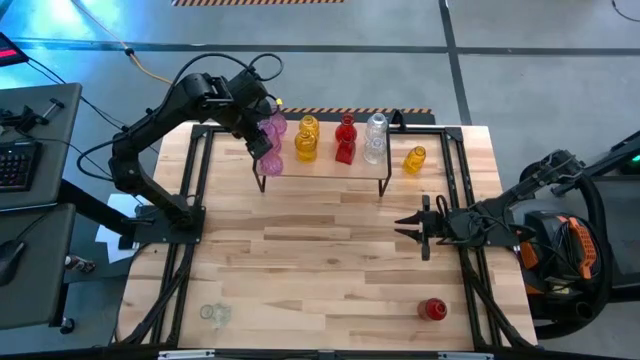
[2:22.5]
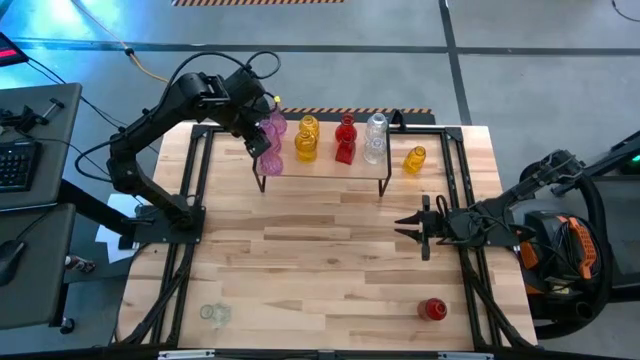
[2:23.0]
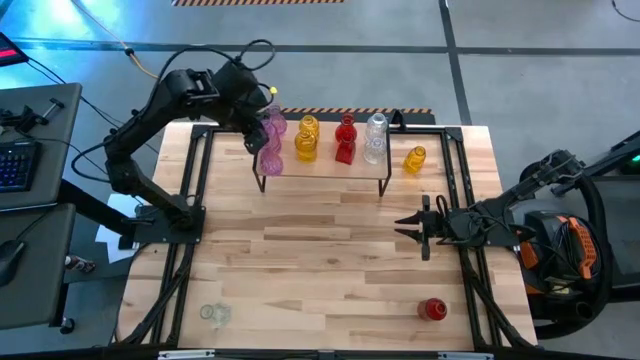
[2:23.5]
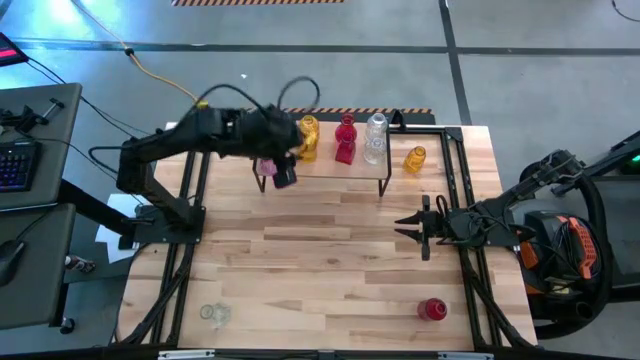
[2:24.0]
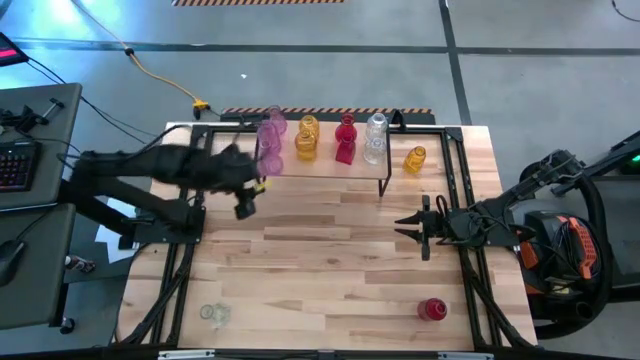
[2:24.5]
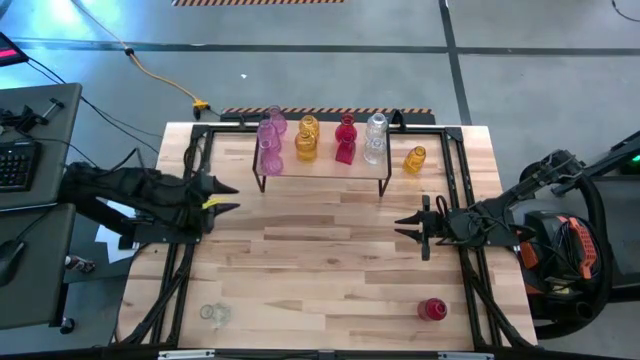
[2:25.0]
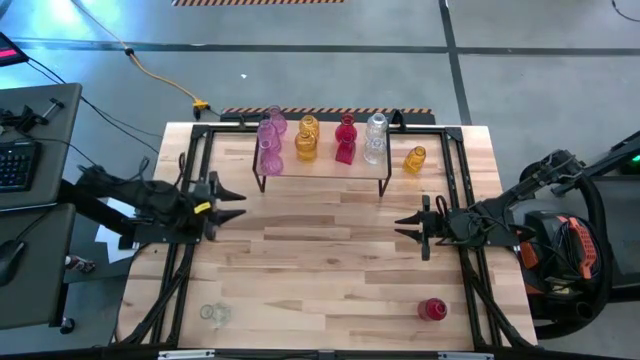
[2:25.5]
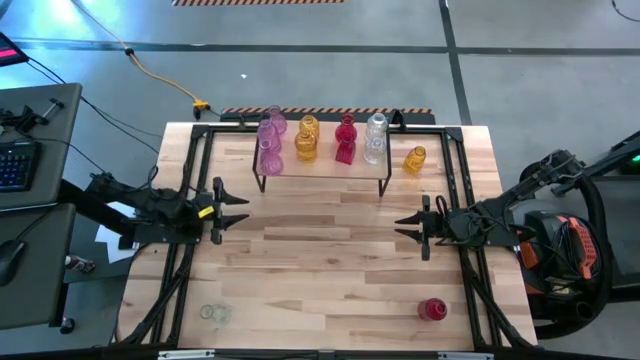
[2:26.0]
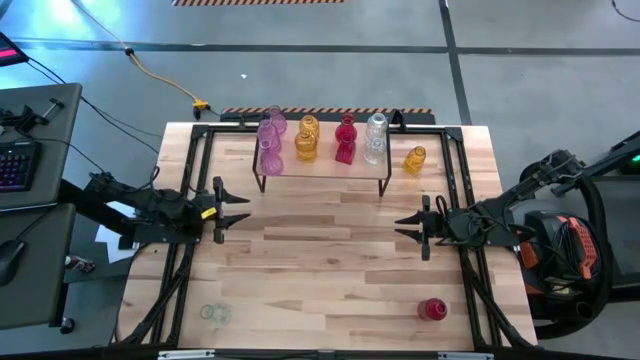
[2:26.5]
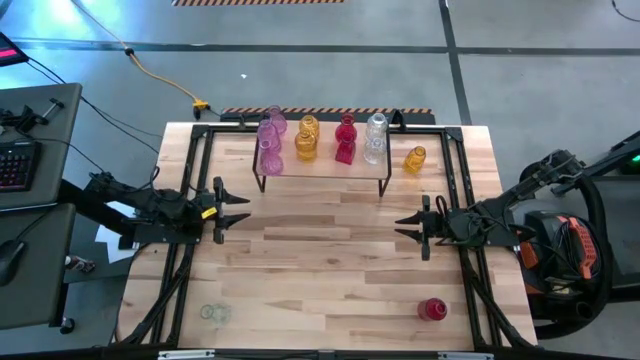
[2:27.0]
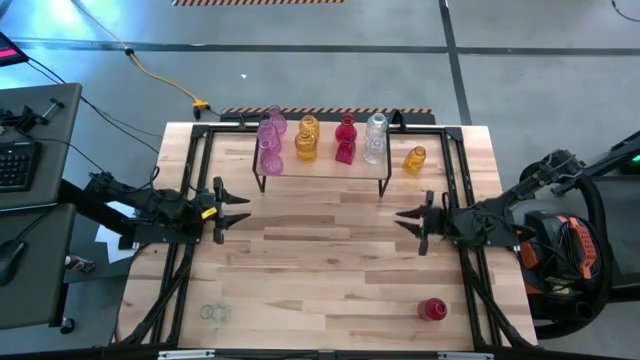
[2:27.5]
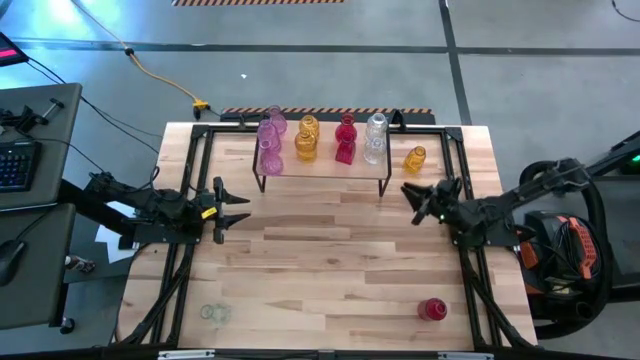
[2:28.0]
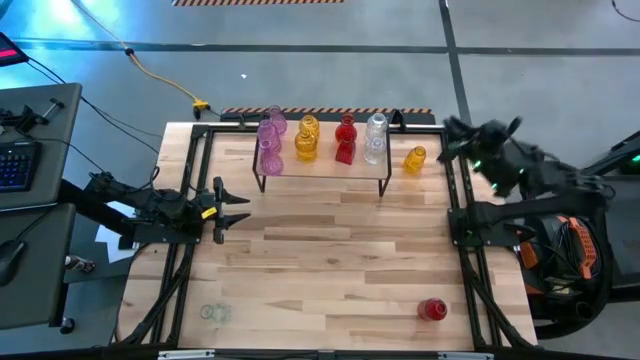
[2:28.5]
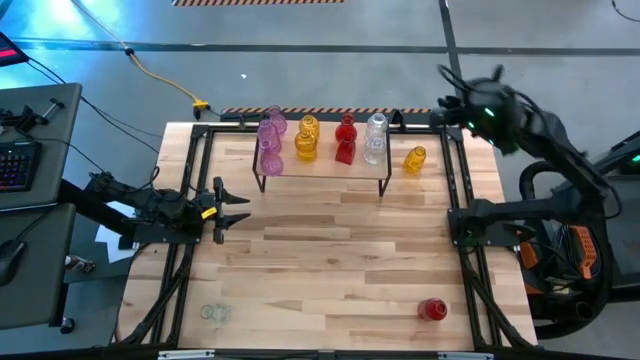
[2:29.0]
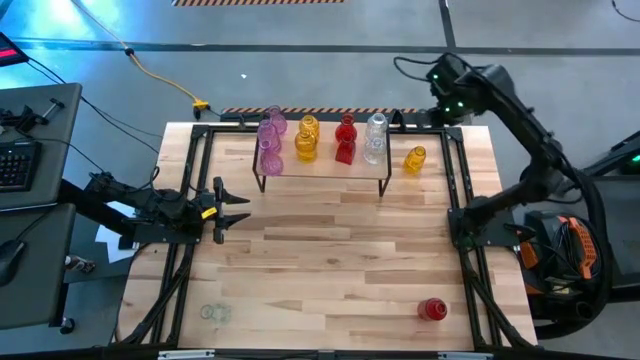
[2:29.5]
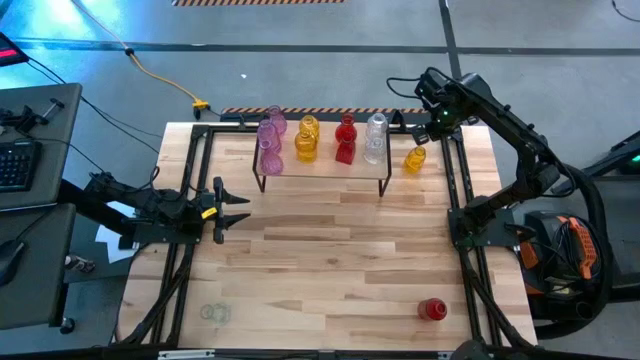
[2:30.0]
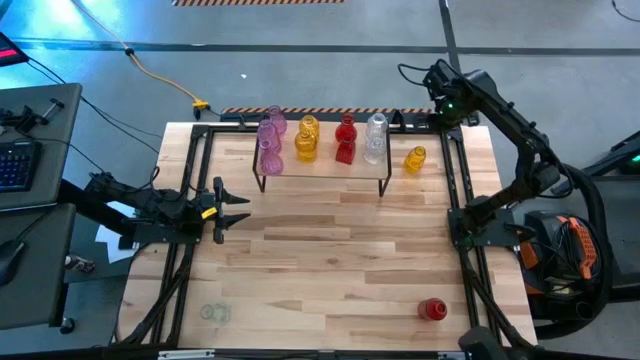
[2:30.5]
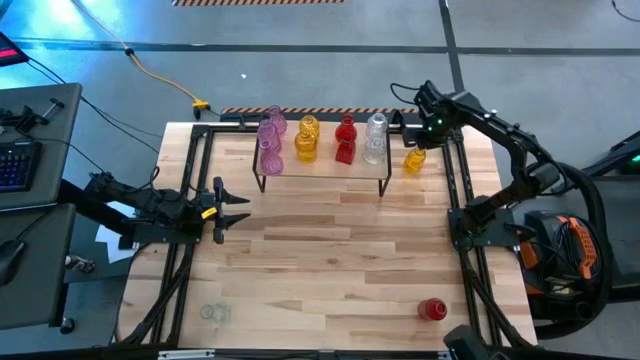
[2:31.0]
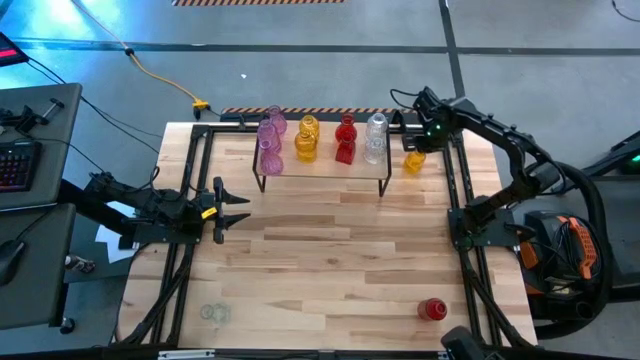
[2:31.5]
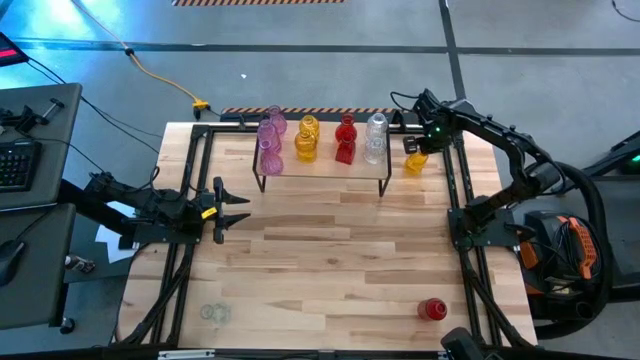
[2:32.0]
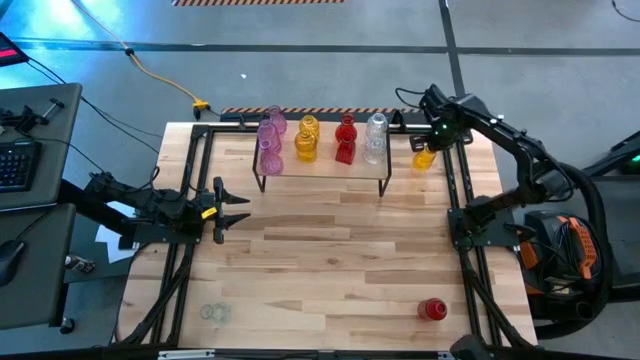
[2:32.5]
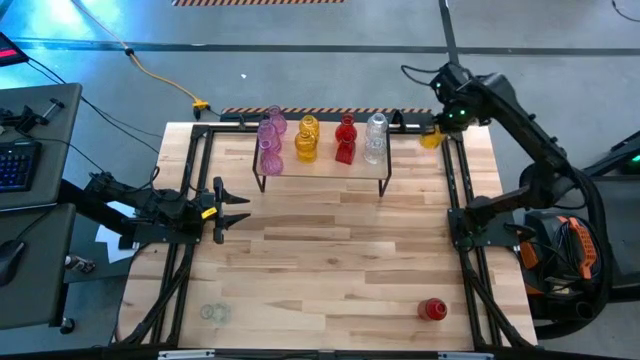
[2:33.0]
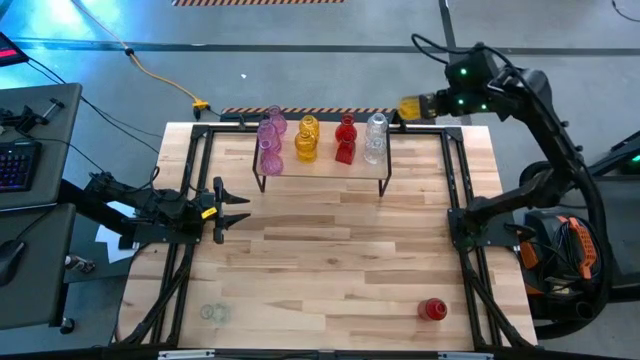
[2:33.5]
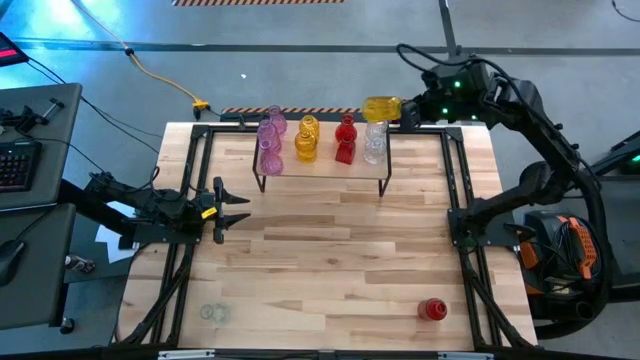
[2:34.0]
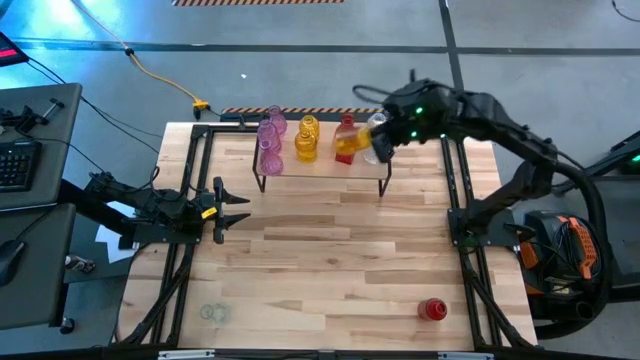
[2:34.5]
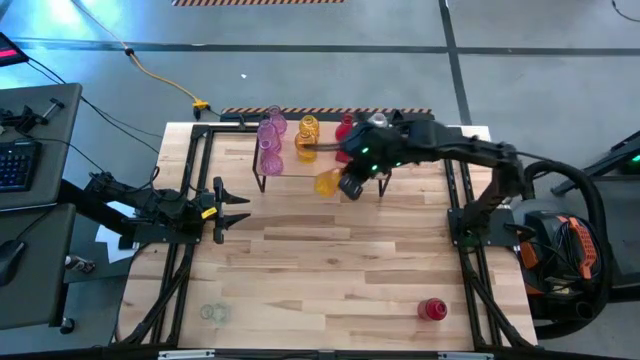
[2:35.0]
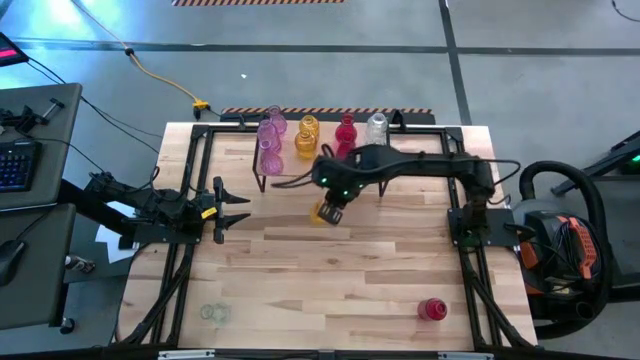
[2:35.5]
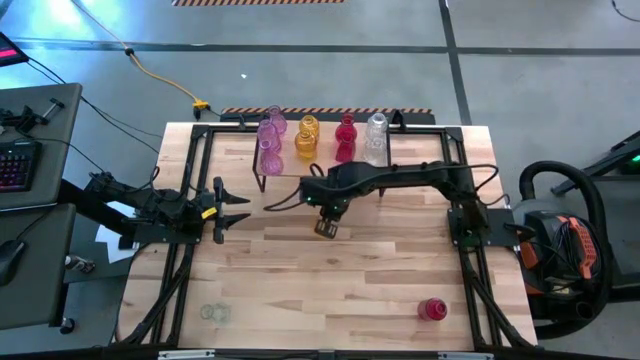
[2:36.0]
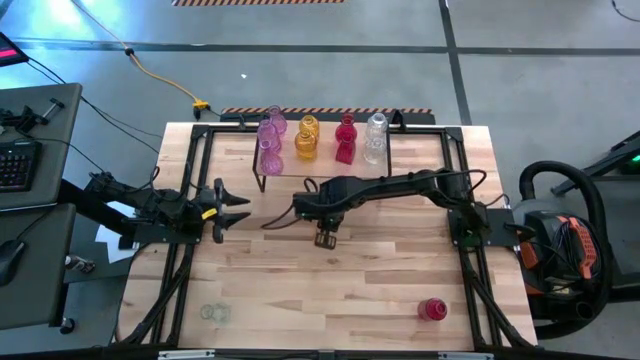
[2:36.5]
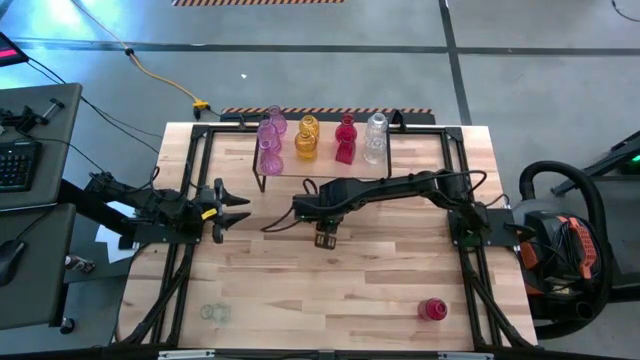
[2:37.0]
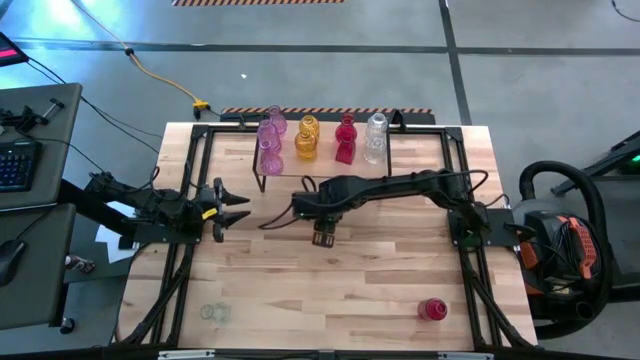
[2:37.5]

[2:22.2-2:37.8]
Task: sort vases onto shelf
Put the yellow vase on the shelf aligned with the other yellow vases

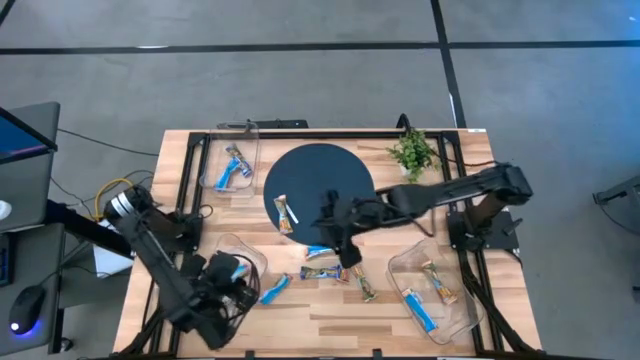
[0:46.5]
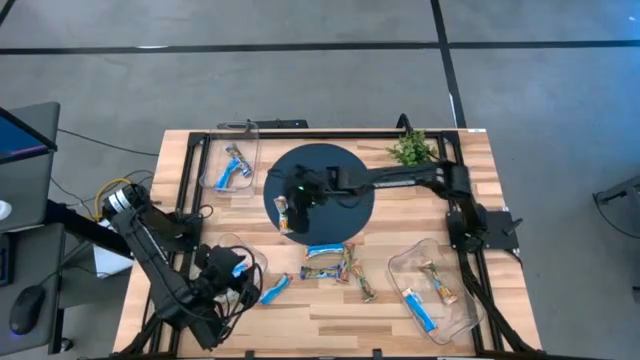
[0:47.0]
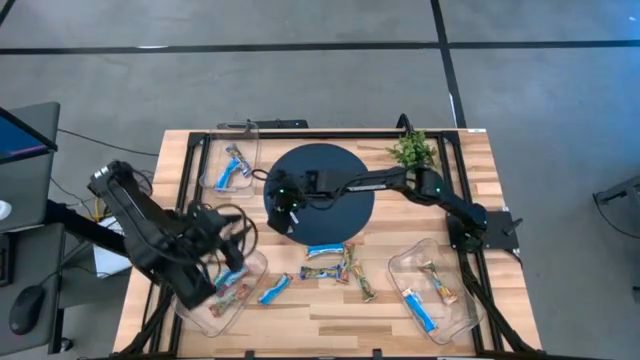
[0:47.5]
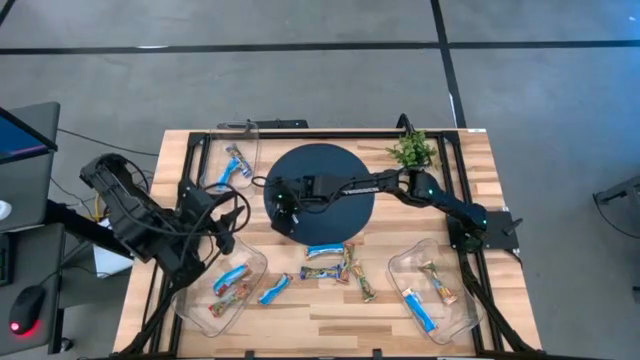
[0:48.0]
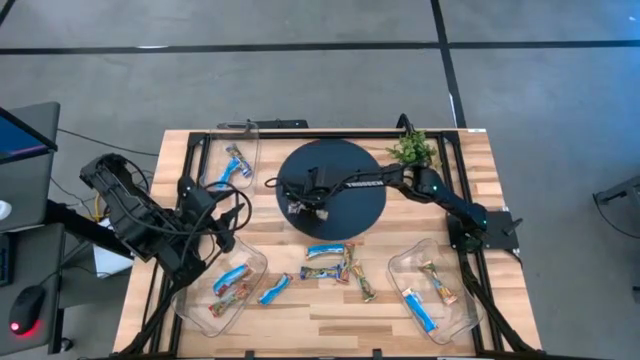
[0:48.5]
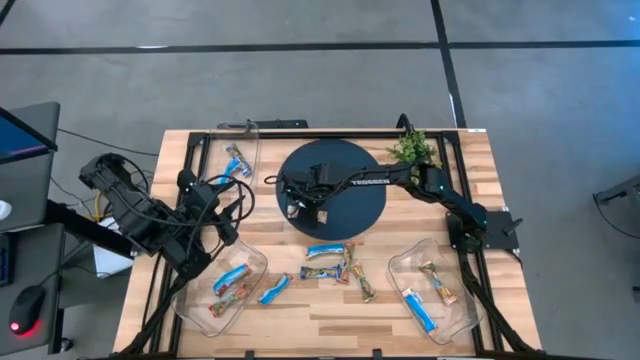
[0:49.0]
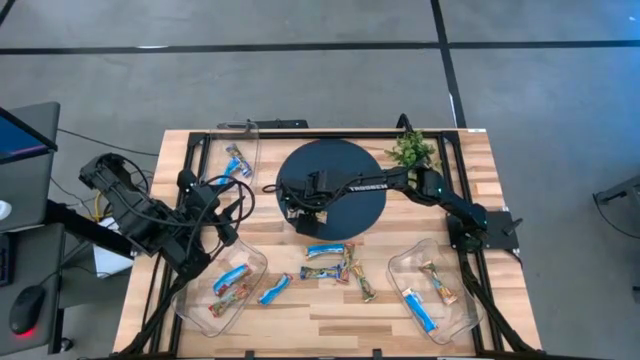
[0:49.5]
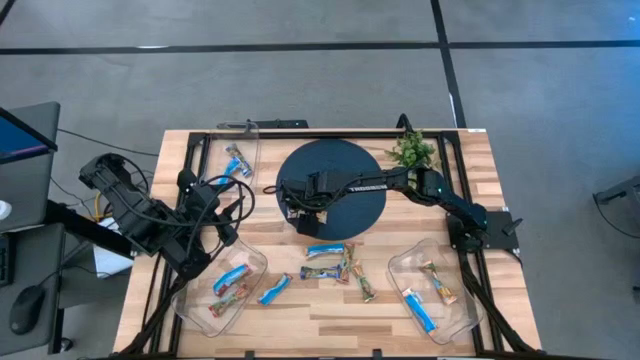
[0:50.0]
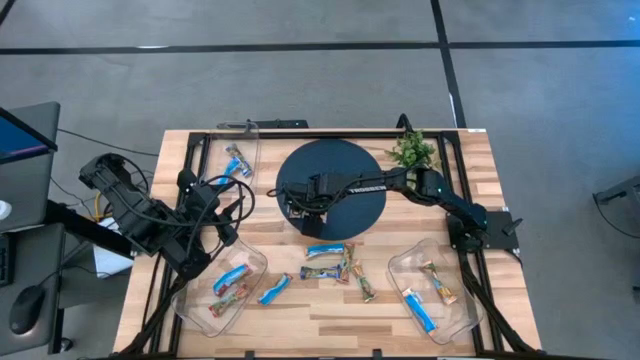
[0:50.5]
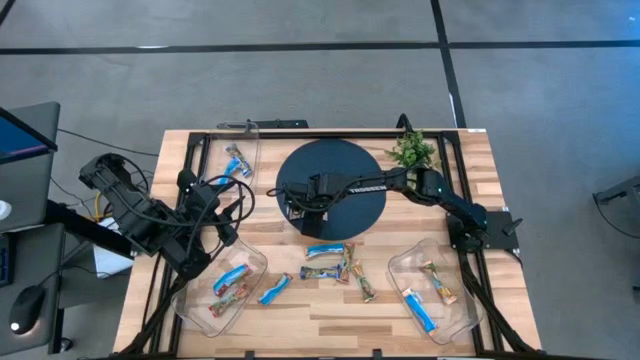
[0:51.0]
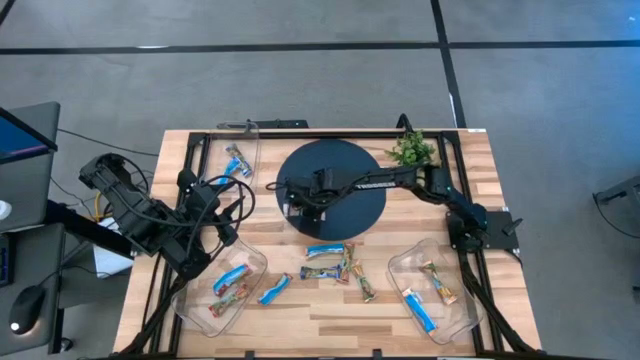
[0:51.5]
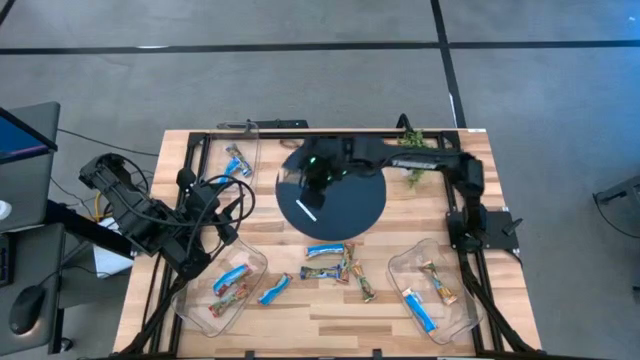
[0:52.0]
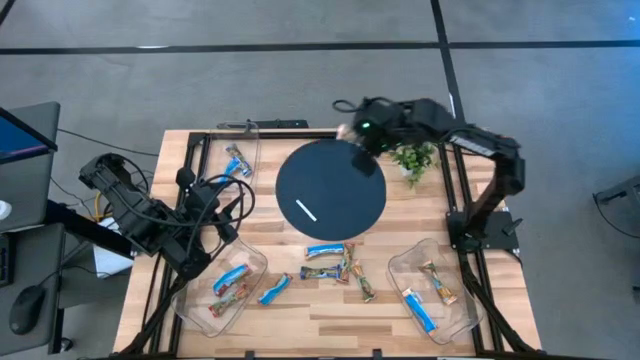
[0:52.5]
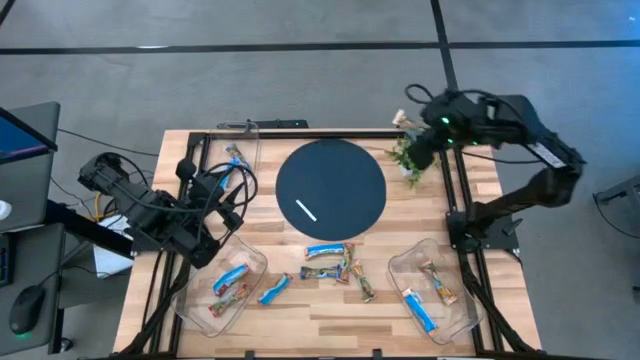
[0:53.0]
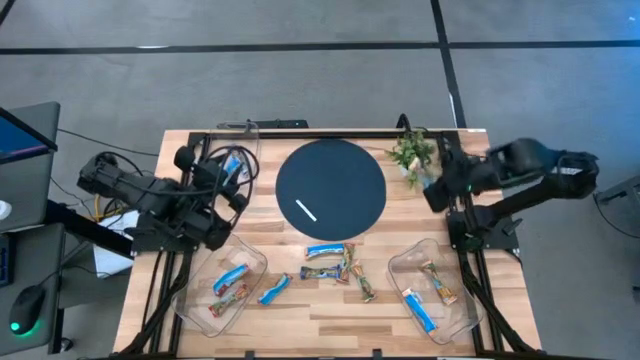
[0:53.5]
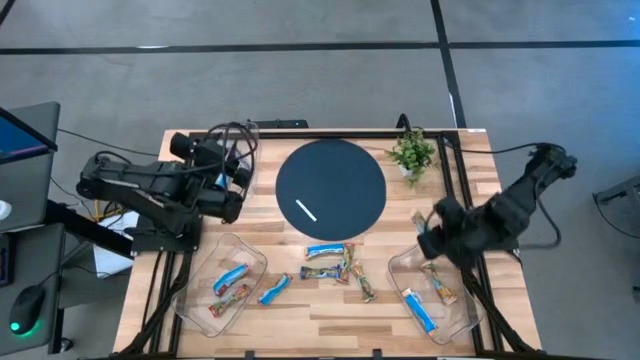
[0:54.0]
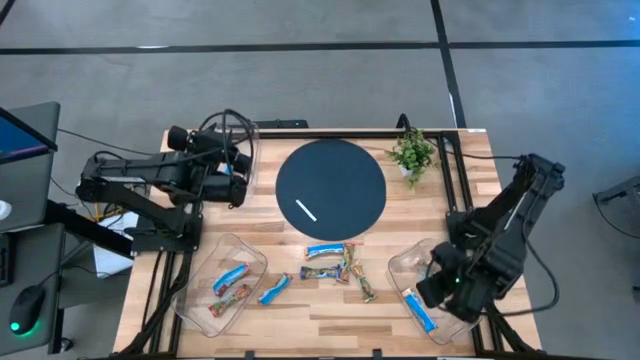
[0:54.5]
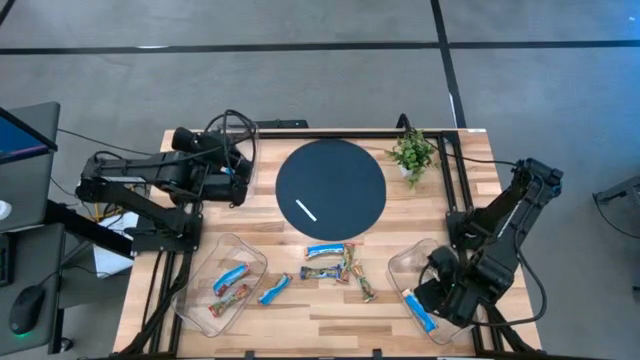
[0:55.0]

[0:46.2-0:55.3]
Task: Pick and place Granola Bars by type
Put the yellow granola bar into the bottom right transparent bin
